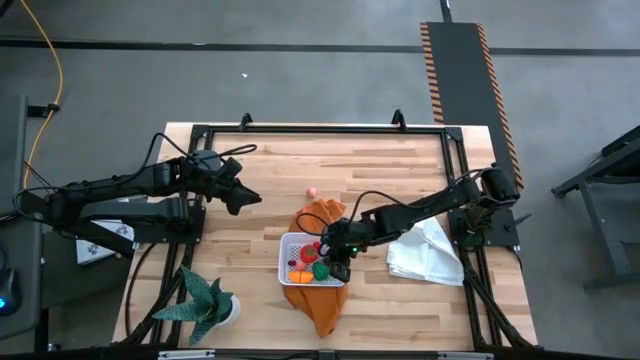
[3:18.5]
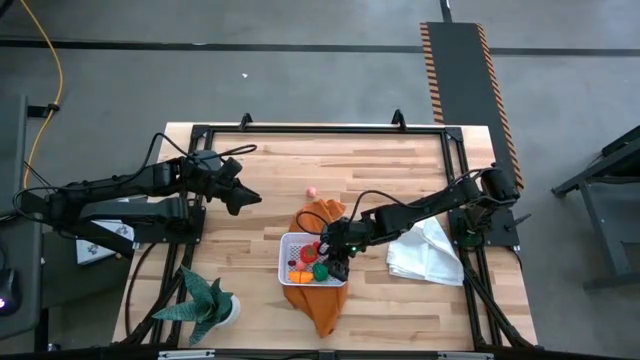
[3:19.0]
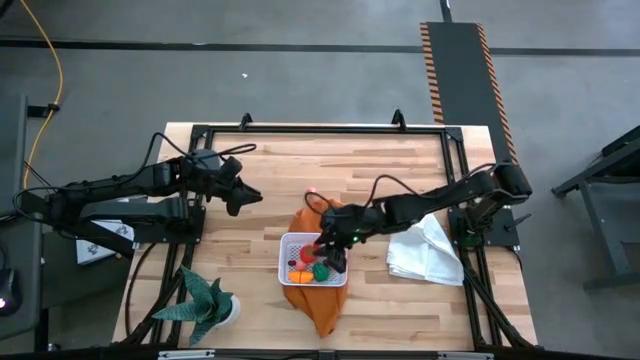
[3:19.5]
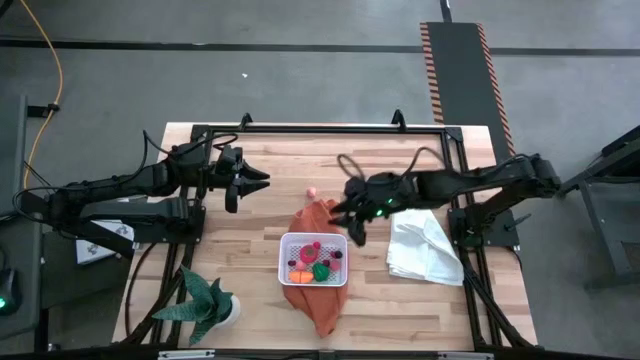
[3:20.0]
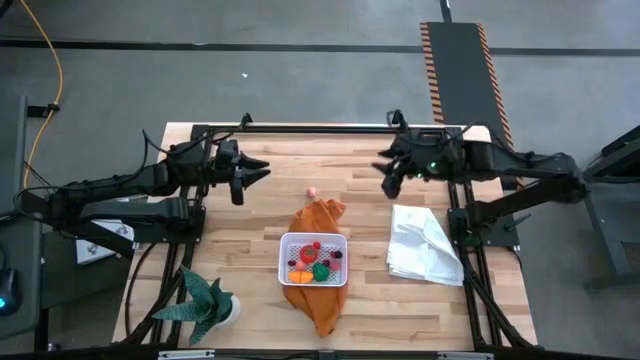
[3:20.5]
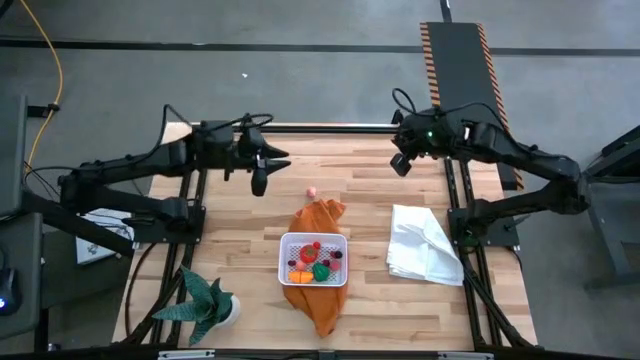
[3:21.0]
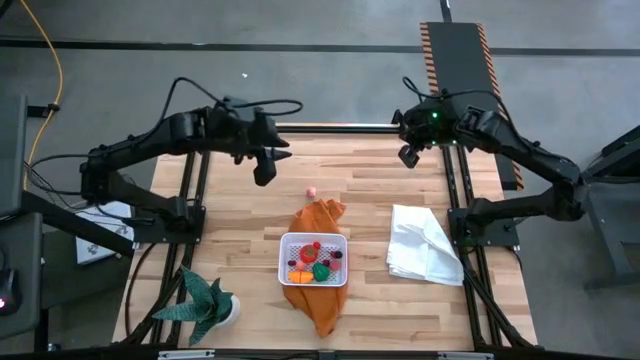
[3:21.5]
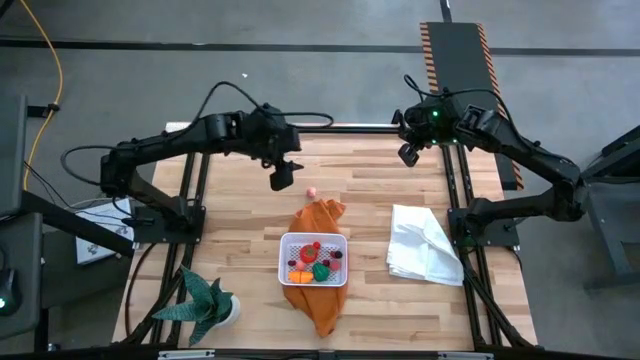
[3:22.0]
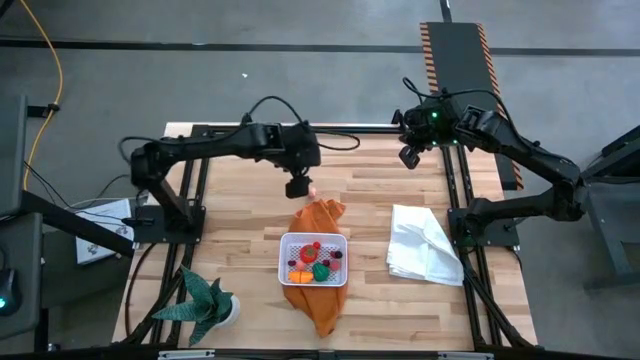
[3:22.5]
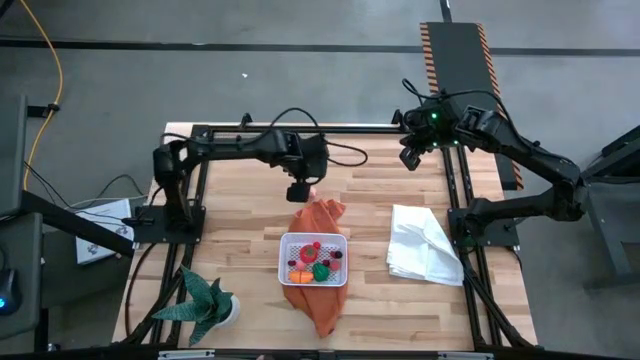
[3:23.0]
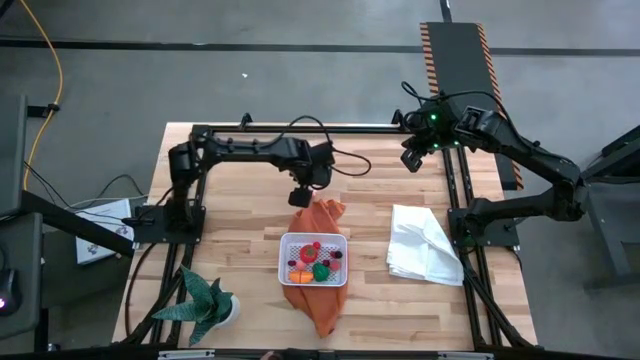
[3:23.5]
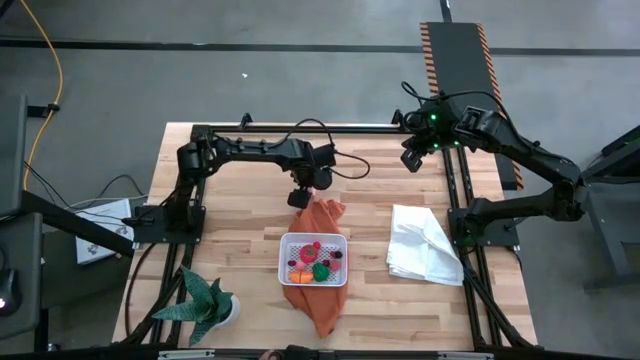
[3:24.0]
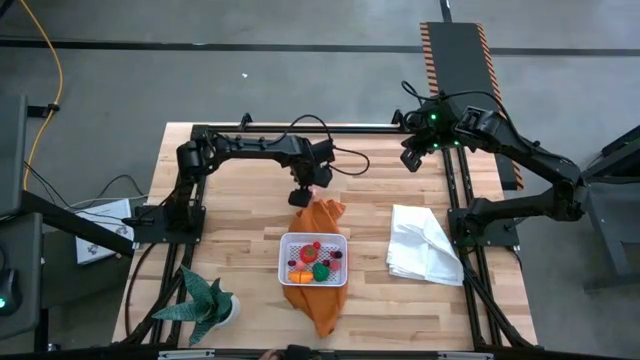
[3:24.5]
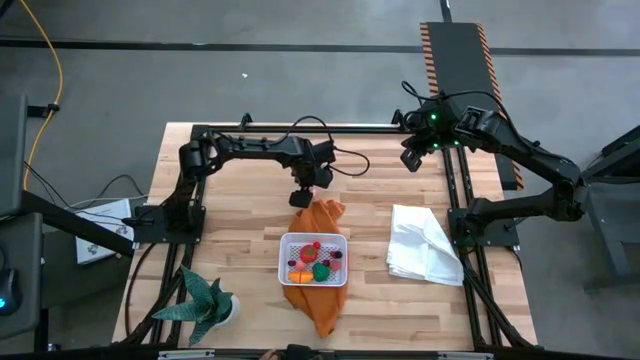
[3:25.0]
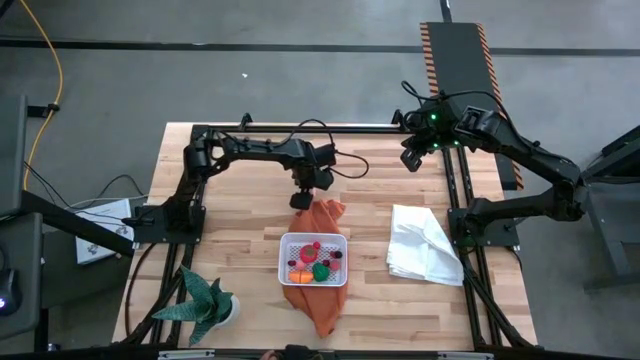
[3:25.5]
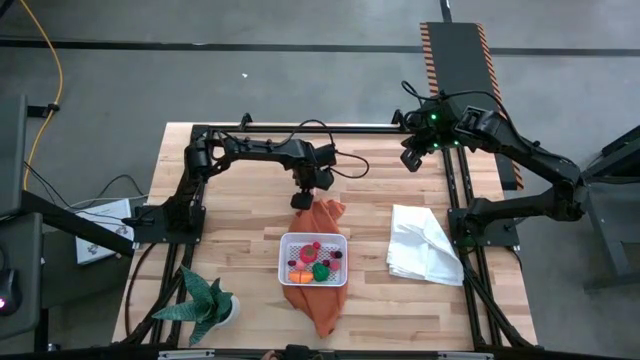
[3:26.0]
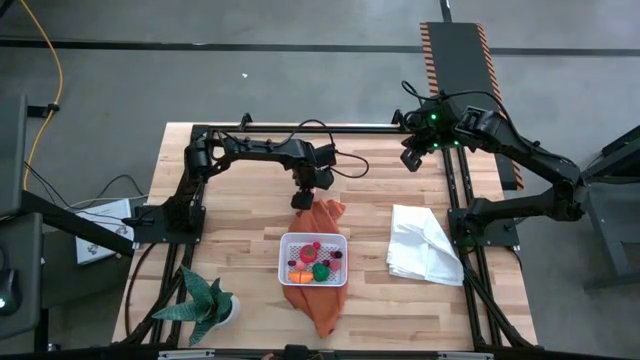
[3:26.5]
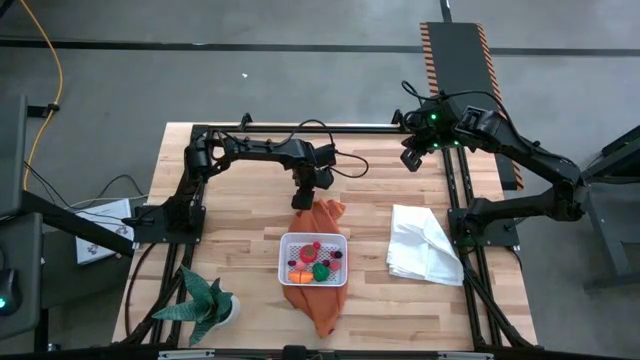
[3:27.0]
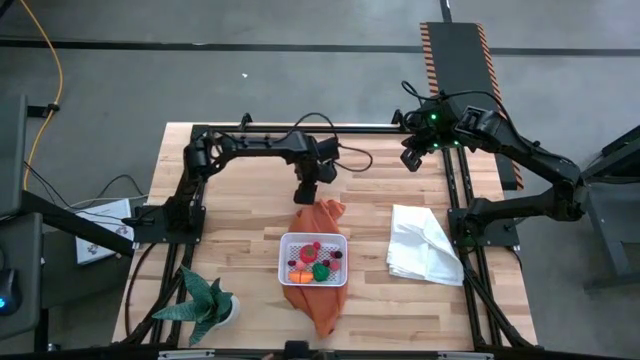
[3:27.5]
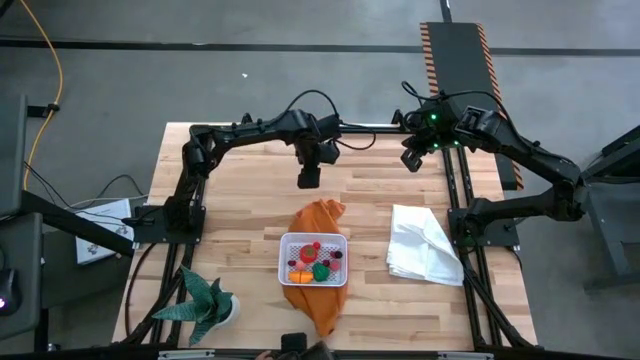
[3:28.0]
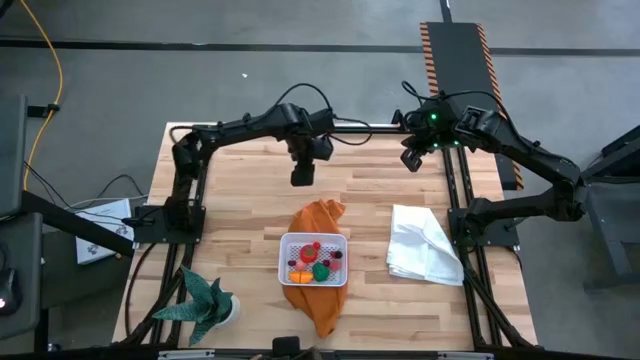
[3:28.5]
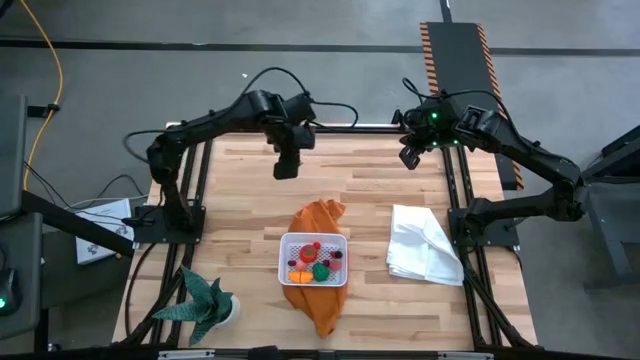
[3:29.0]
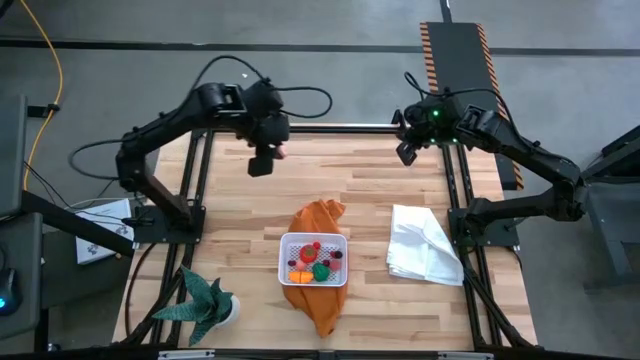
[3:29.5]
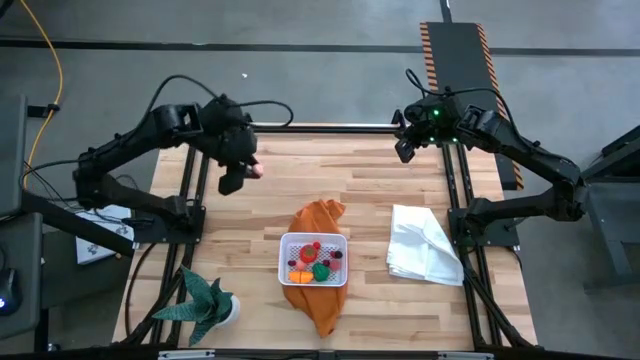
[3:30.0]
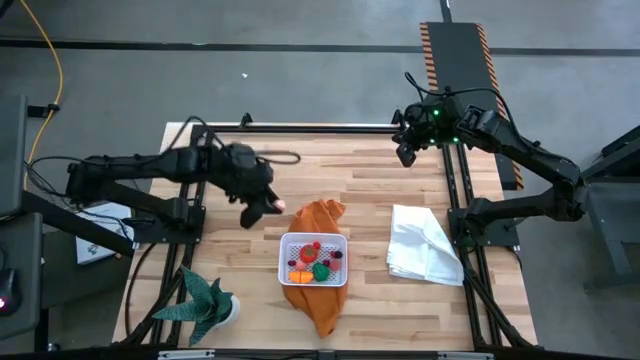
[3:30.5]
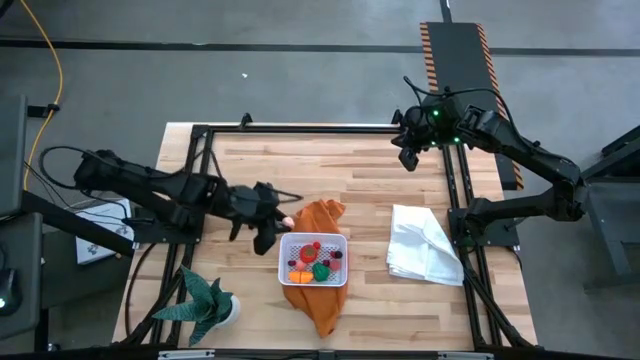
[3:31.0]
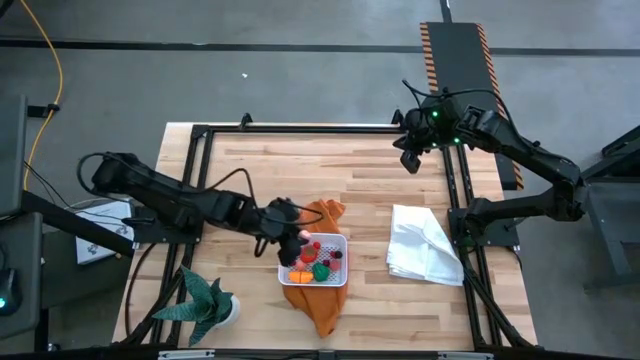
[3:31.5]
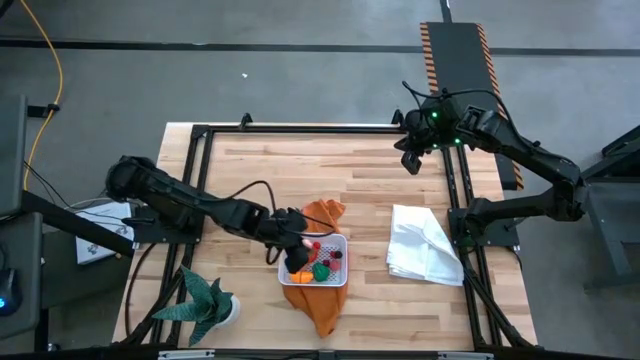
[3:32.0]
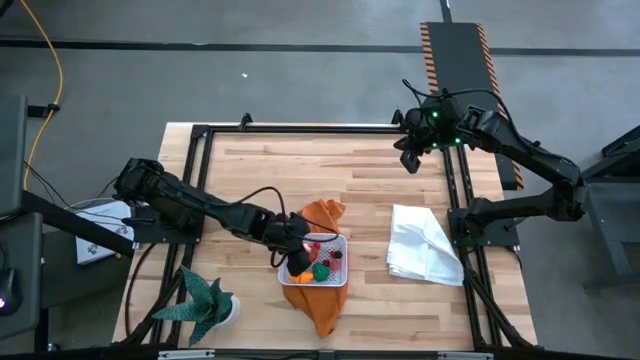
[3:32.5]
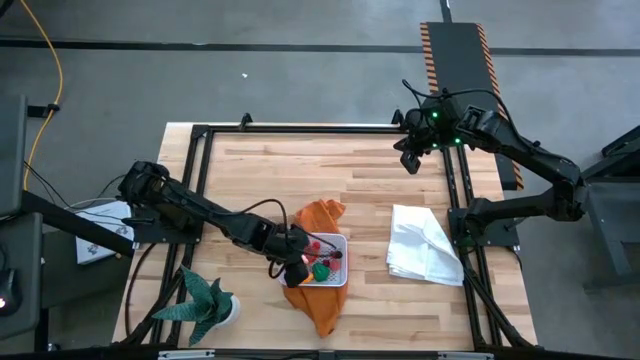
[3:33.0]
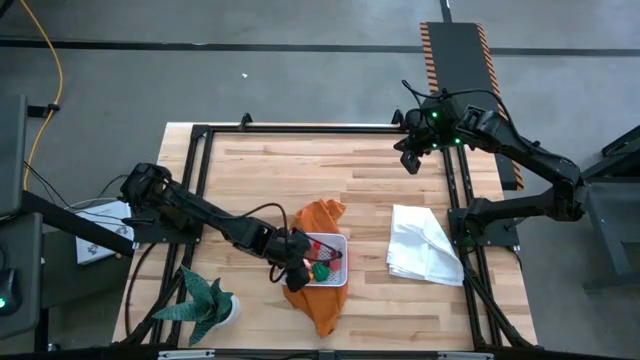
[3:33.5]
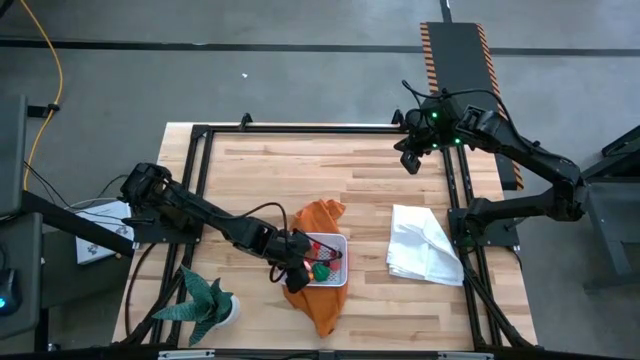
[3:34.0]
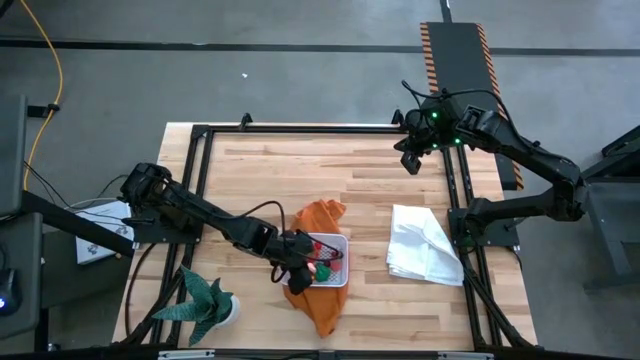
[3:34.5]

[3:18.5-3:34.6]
Task: Pick and placing Produce into tupperware
Put the pink peach into the white basket
